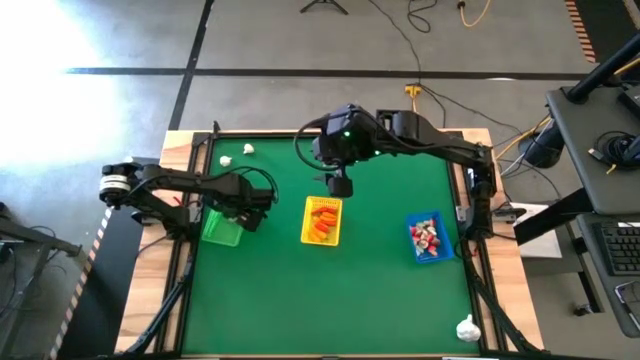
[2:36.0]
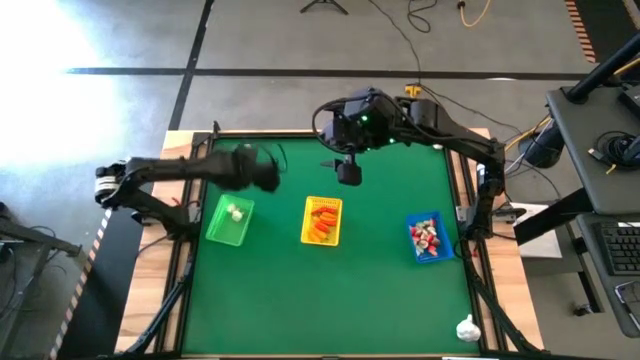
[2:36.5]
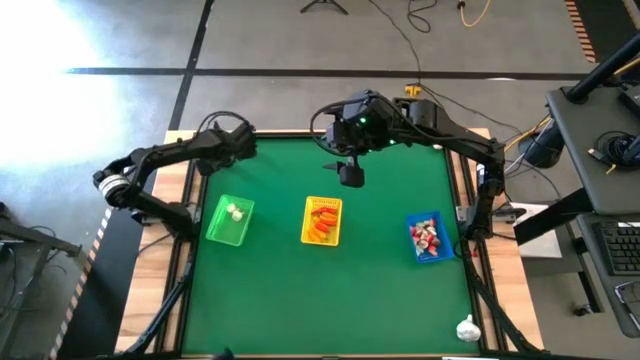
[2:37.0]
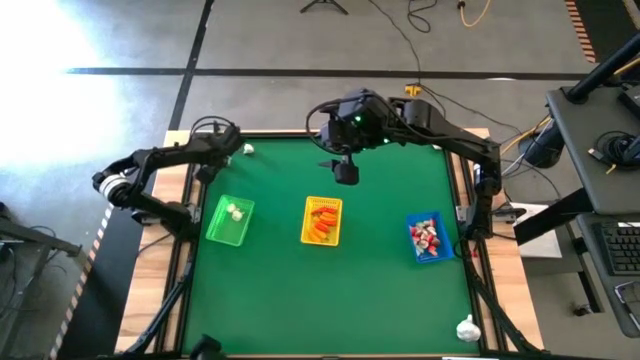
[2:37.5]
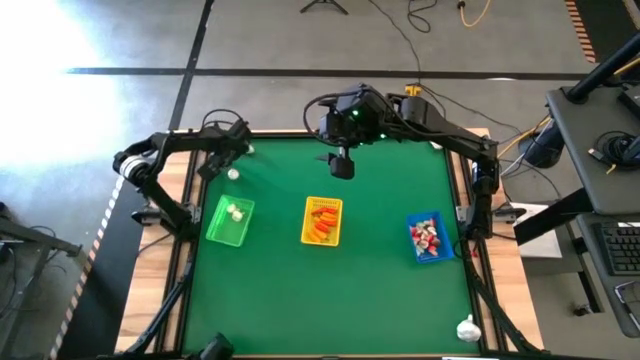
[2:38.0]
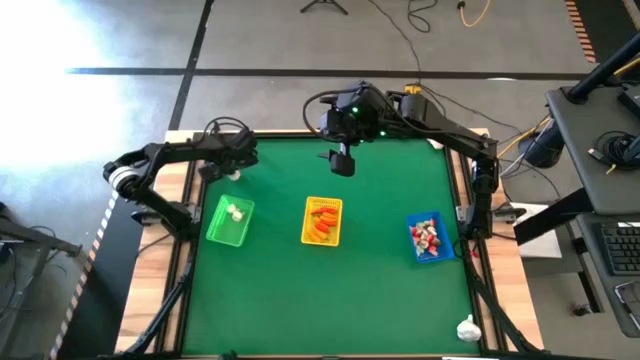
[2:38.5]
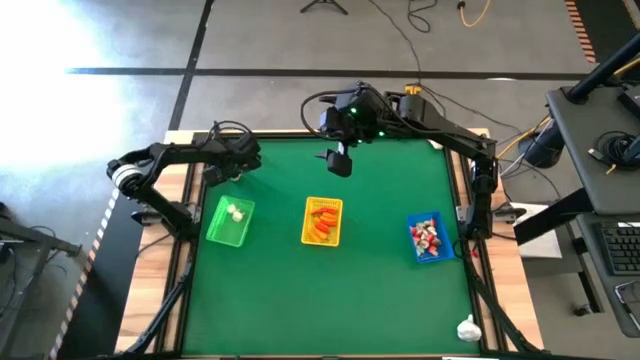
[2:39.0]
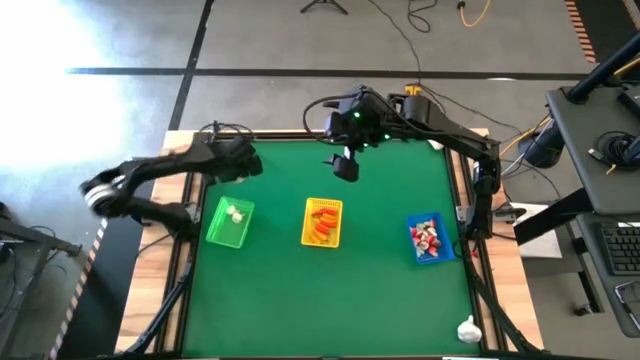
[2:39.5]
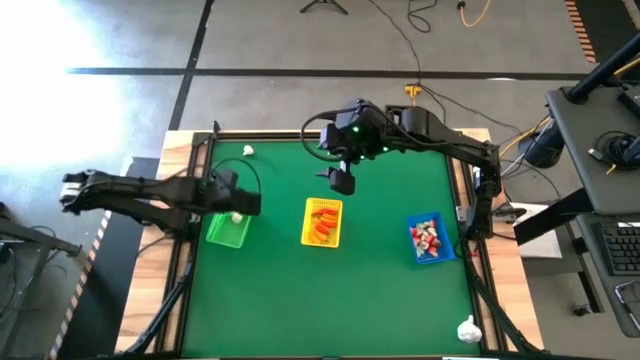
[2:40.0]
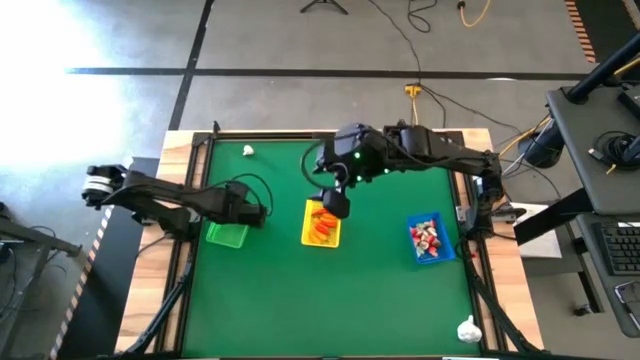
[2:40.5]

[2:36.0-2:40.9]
Task: Sort produce into baskets
Put the white garlic into the green bin

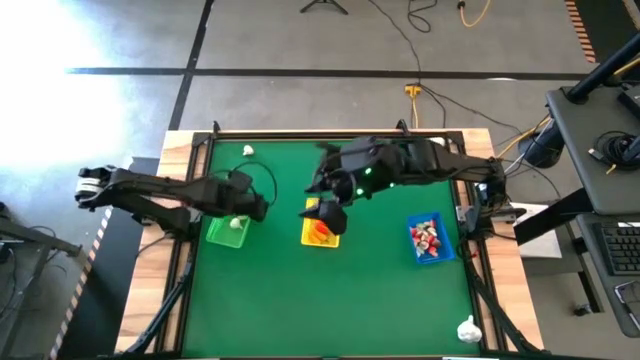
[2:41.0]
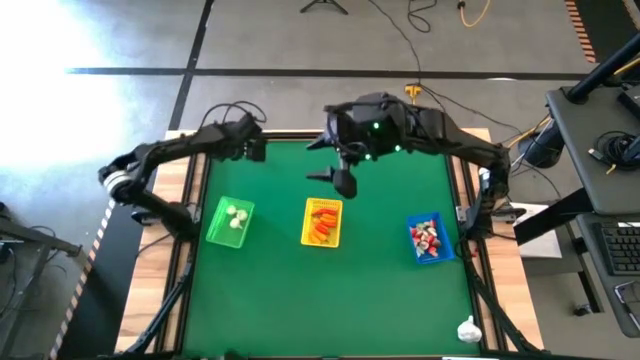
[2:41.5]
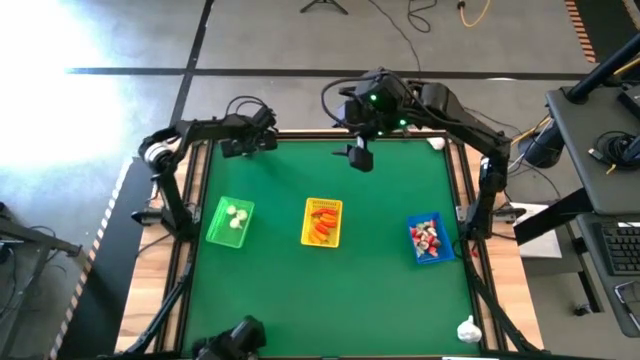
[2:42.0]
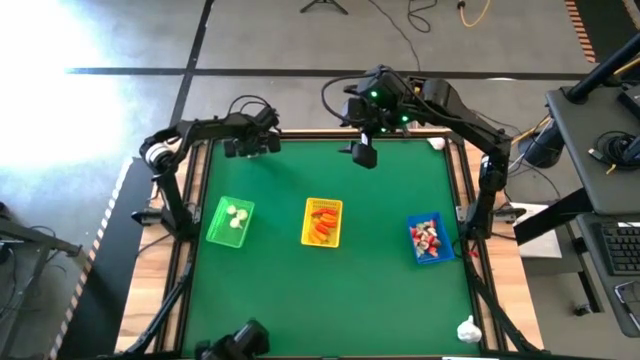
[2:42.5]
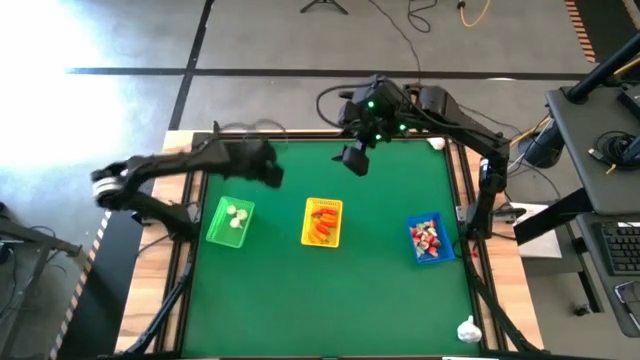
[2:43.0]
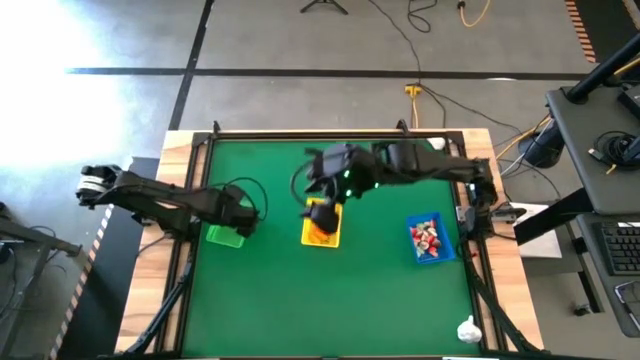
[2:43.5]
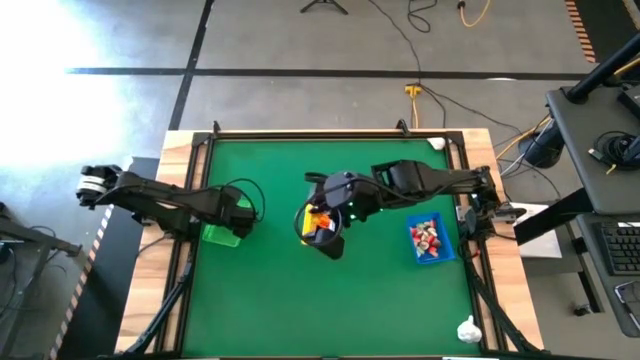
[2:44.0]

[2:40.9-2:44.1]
Put the white garlic into the green bin

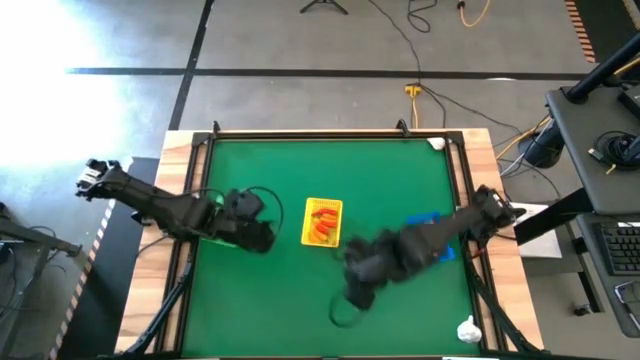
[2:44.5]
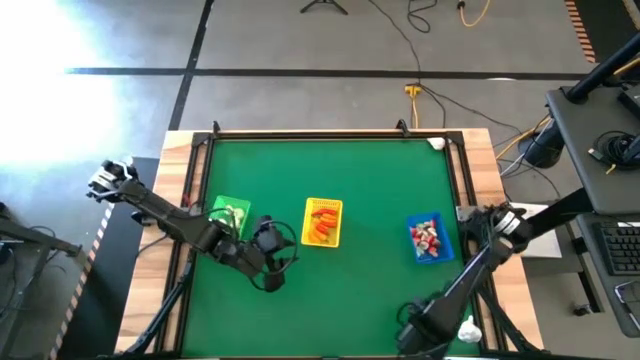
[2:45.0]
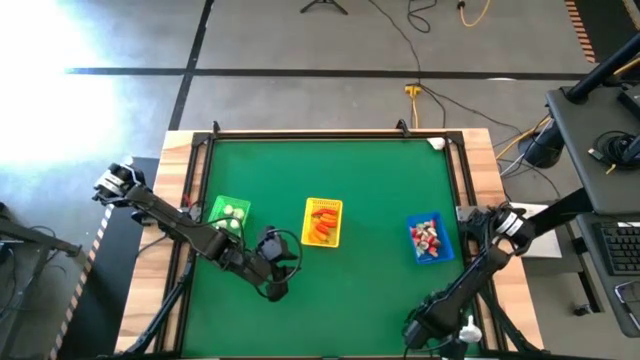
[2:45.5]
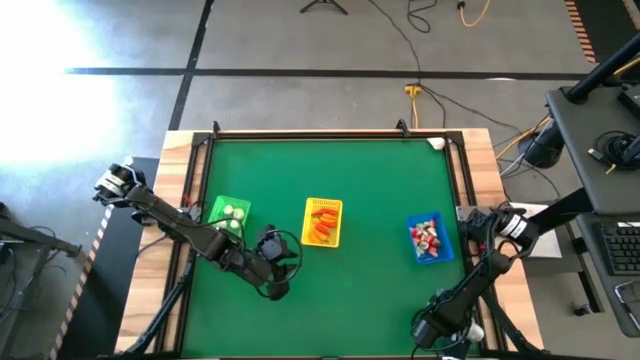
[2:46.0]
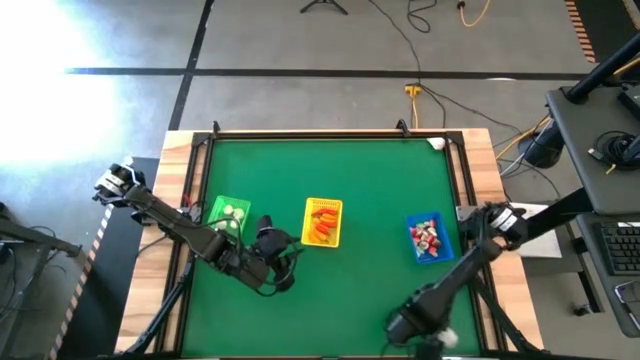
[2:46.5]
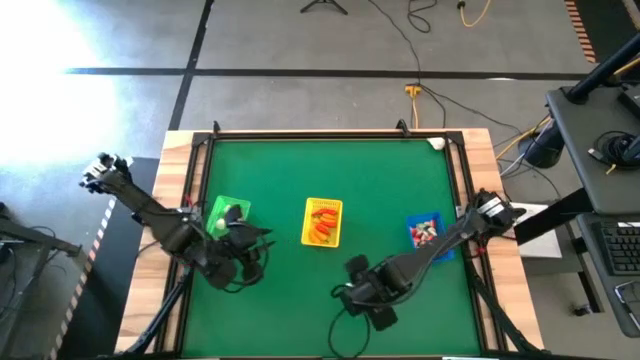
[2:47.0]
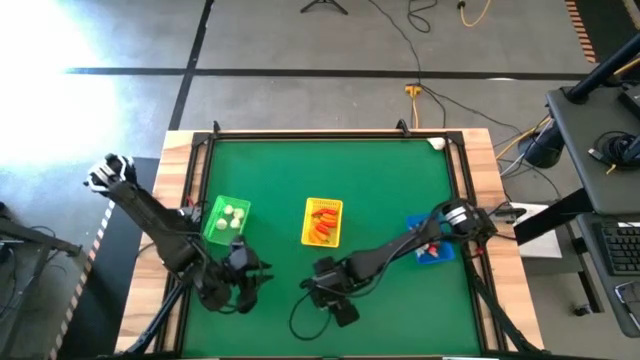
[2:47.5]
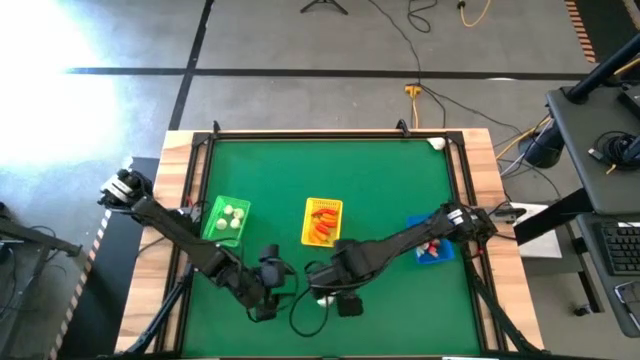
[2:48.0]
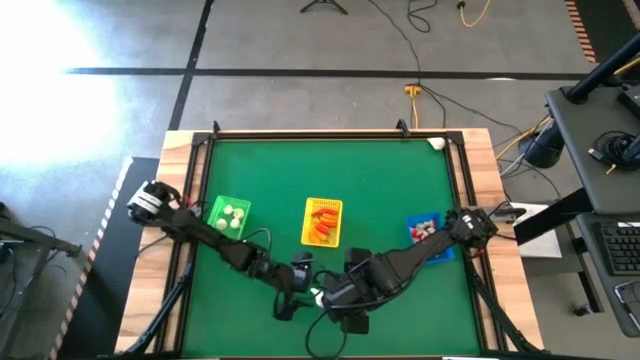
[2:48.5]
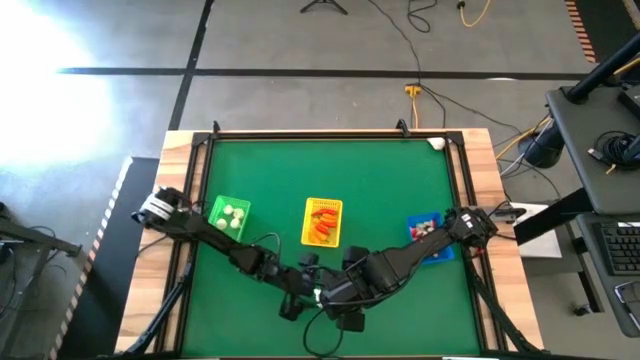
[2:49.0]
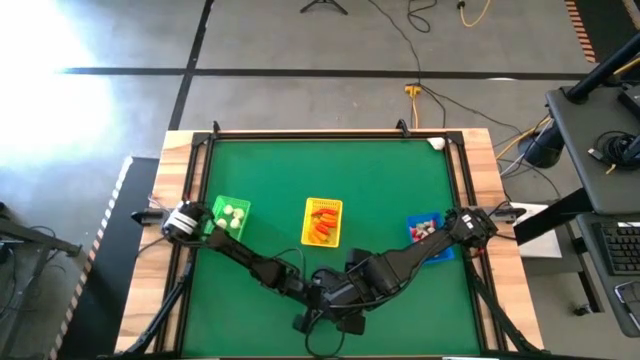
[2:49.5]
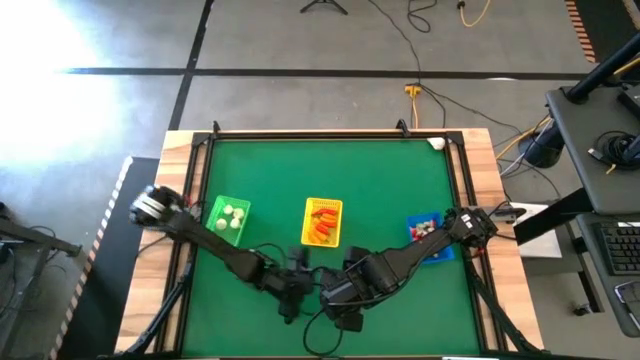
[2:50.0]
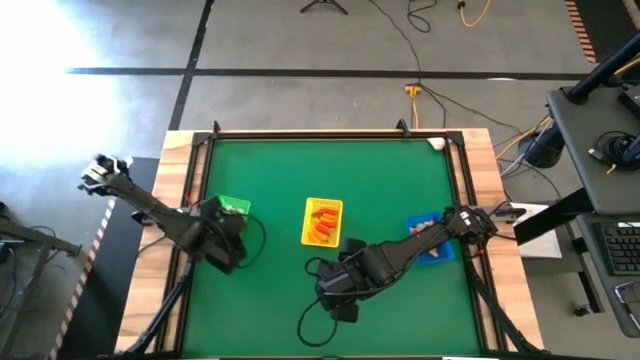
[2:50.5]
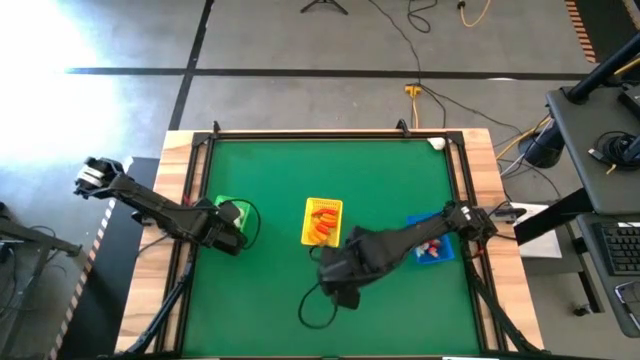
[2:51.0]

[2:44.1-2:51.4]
Put the white garlic into the green bin

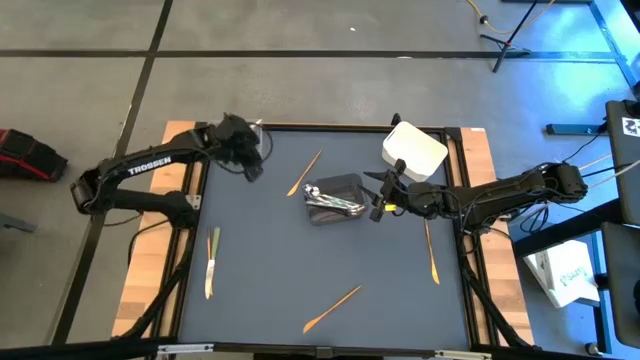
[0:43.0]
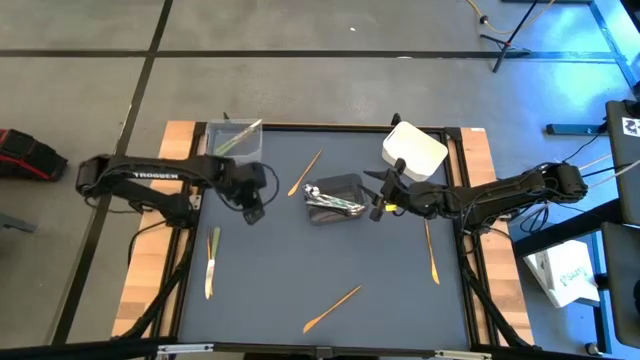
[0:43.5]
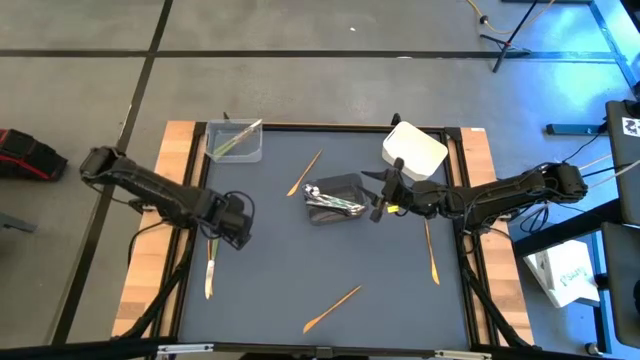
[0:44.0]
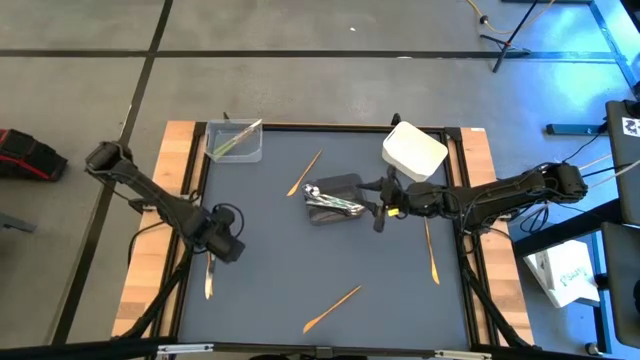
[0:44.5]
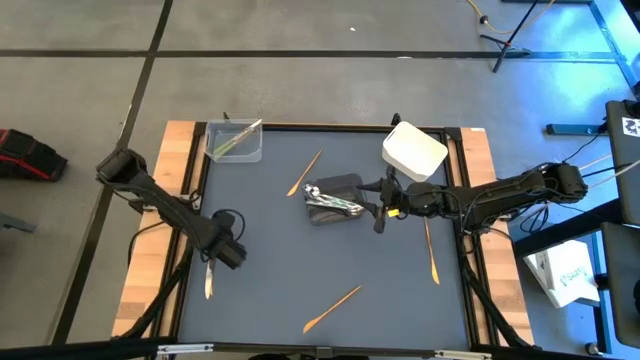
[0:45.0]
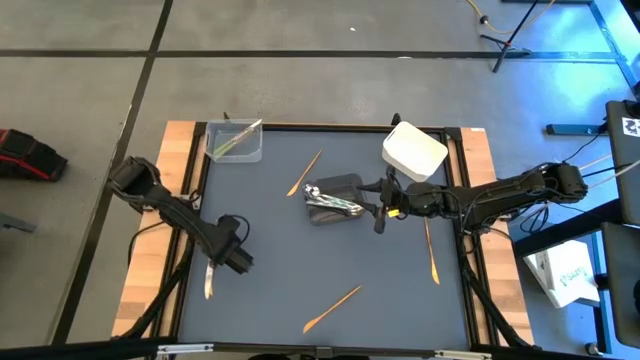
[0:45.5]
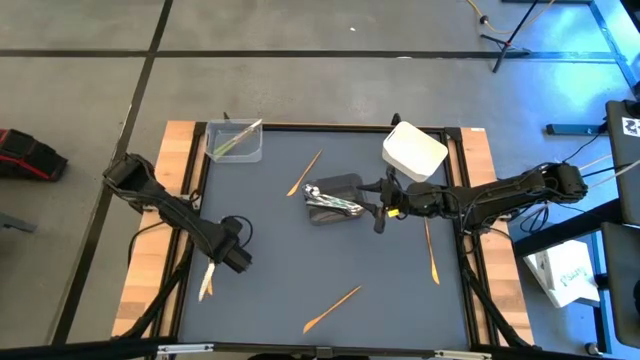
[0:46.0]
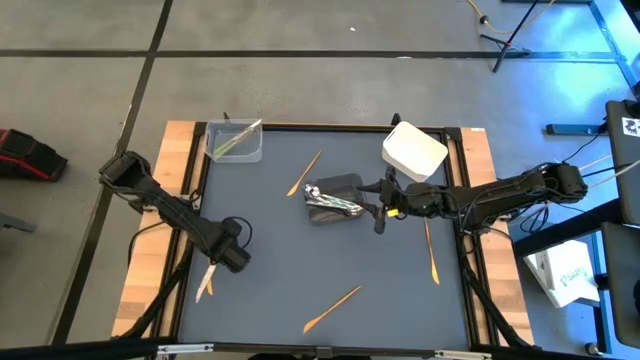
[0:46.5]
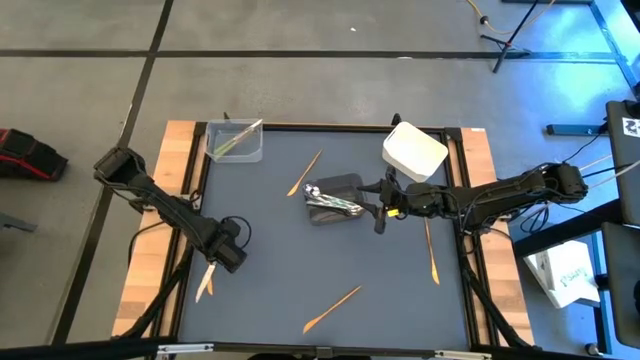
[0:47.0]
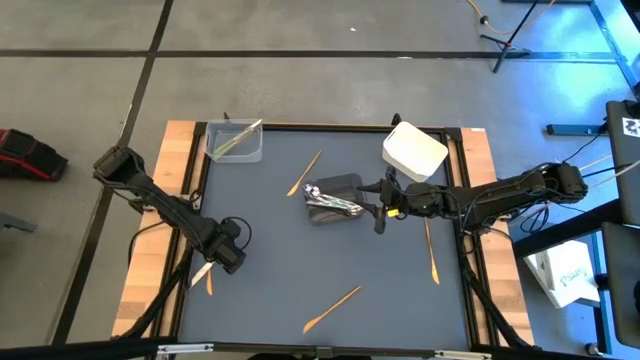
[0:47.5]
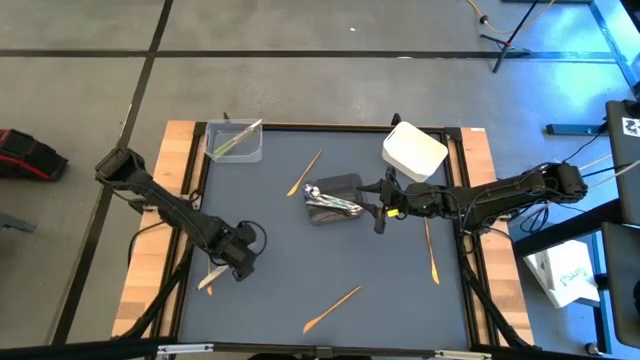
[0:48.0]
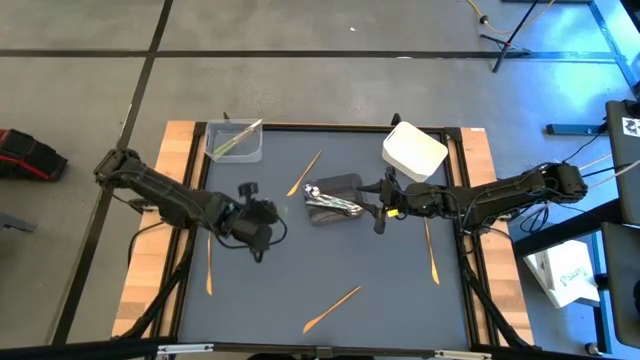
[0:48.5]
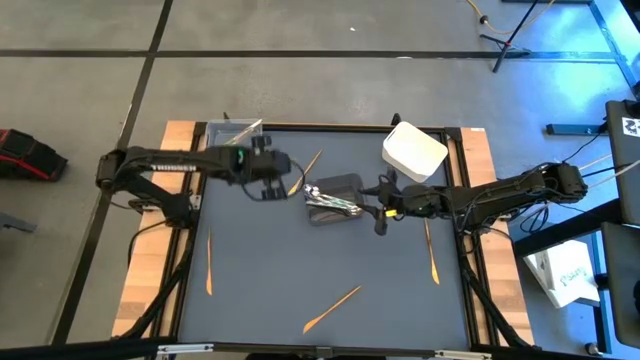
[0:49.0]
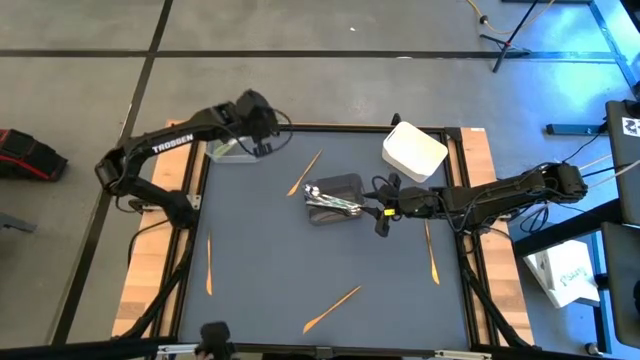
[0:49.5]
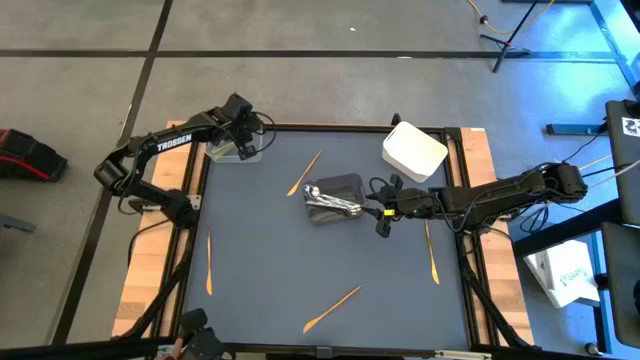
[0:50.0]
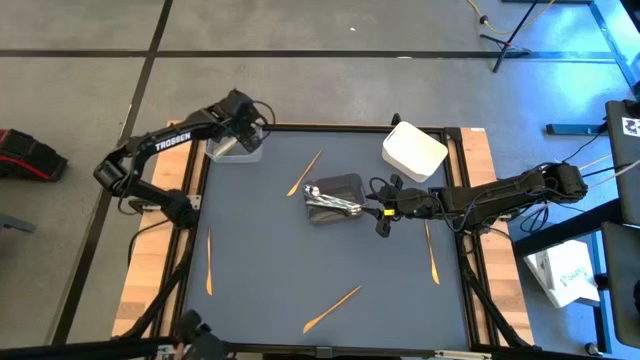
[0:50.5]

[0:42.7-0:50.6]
Task: Sort silverware by color (type)
Put the green table knife into the transparent bin
